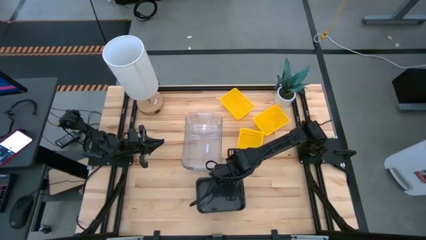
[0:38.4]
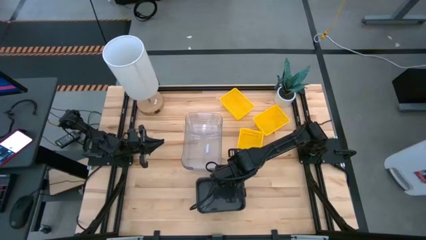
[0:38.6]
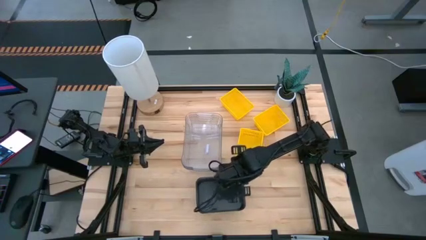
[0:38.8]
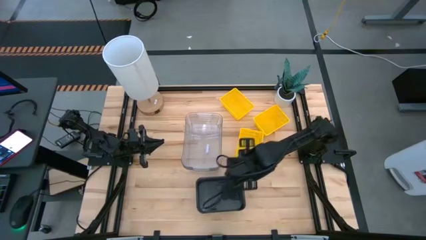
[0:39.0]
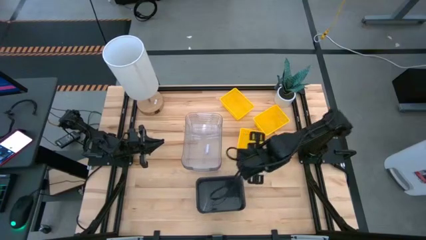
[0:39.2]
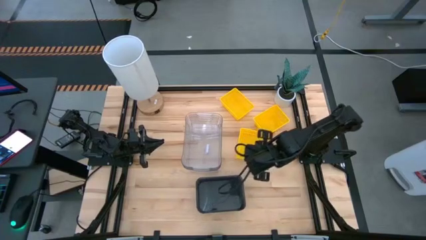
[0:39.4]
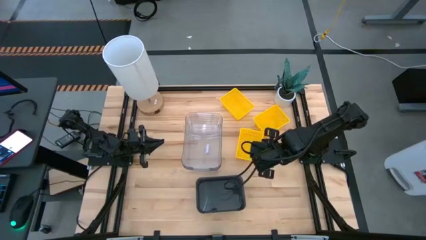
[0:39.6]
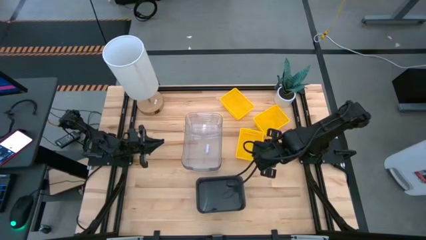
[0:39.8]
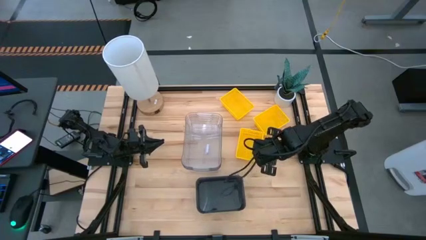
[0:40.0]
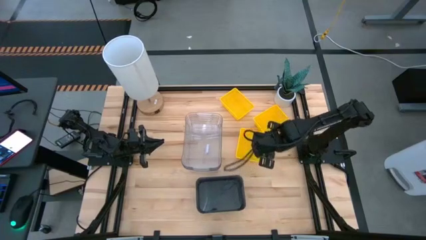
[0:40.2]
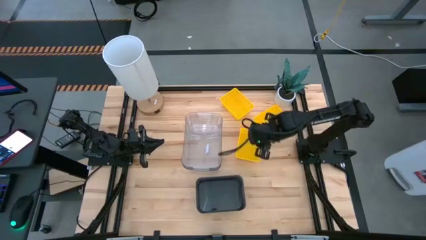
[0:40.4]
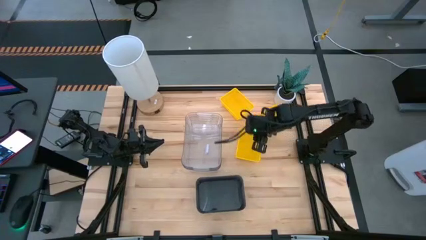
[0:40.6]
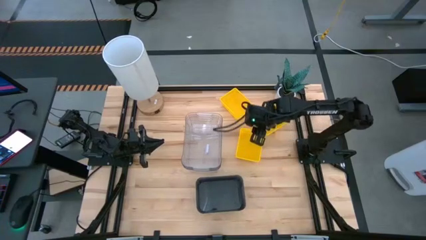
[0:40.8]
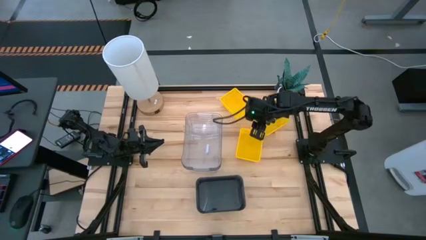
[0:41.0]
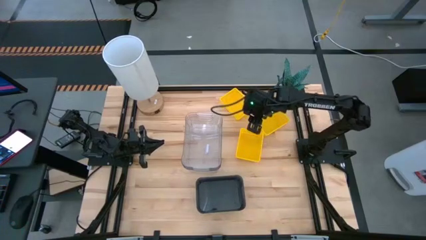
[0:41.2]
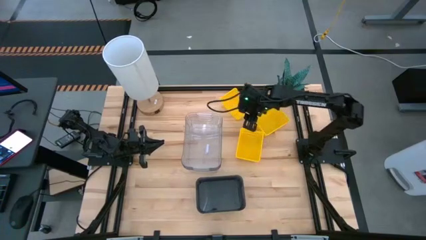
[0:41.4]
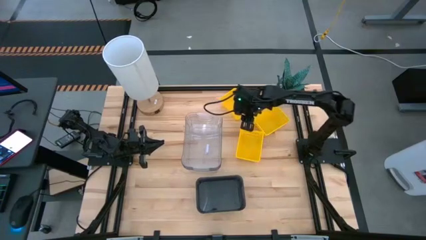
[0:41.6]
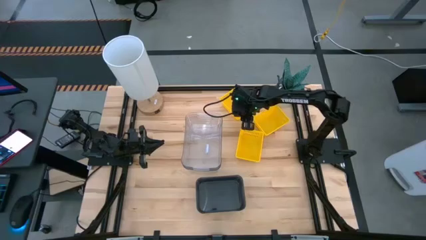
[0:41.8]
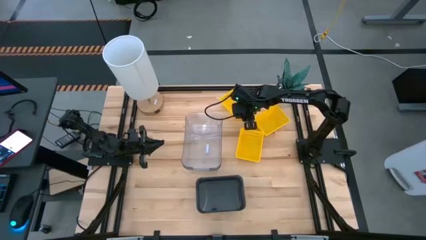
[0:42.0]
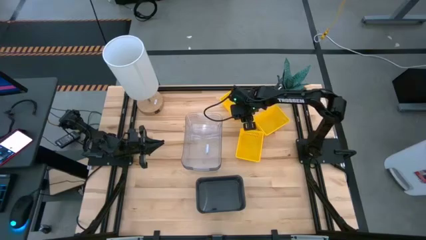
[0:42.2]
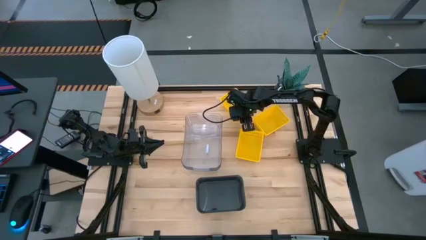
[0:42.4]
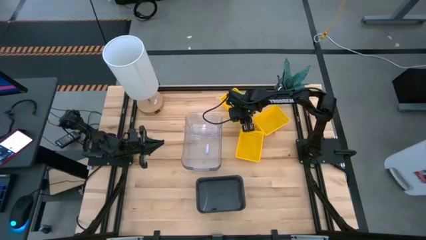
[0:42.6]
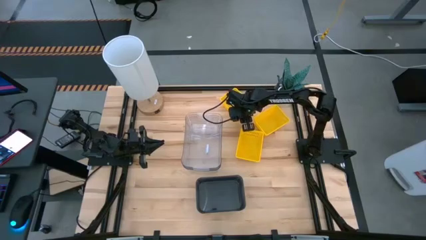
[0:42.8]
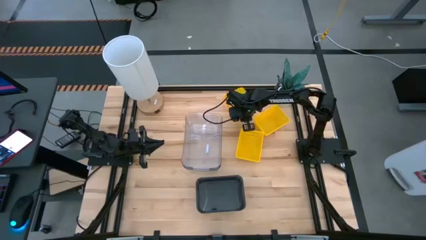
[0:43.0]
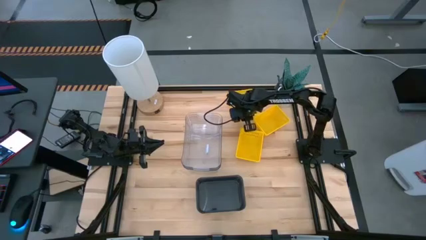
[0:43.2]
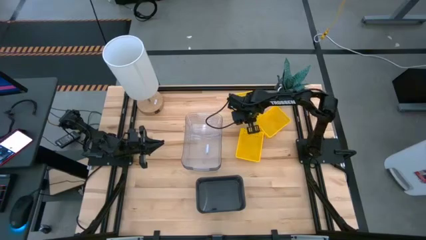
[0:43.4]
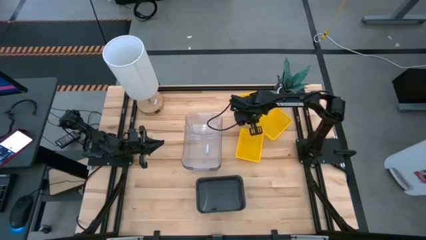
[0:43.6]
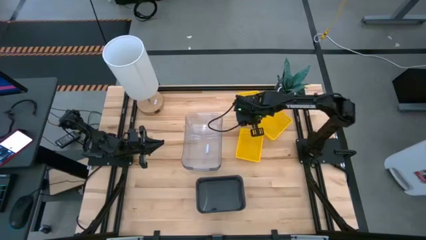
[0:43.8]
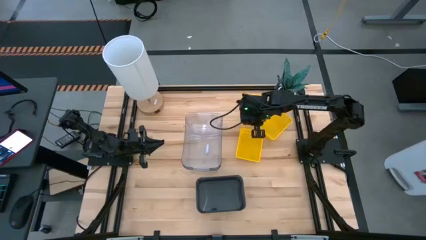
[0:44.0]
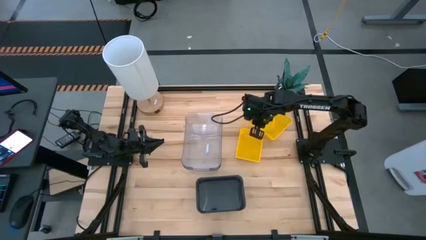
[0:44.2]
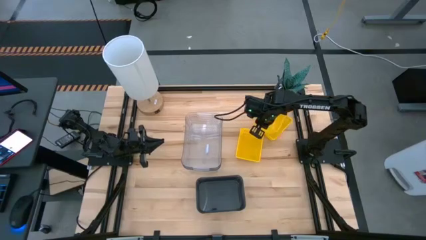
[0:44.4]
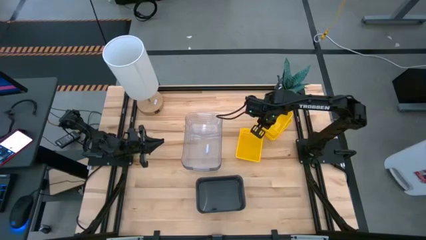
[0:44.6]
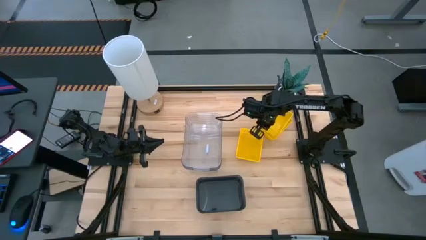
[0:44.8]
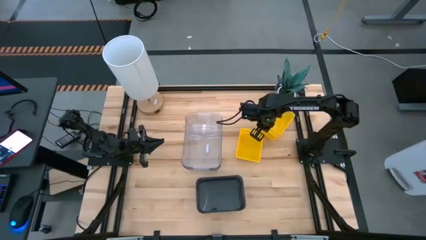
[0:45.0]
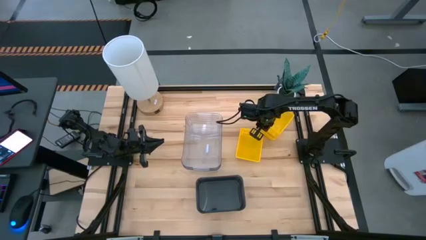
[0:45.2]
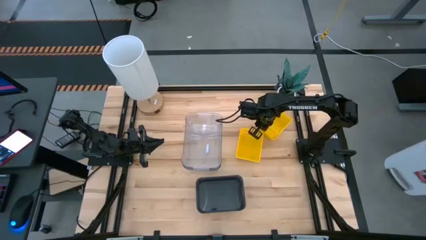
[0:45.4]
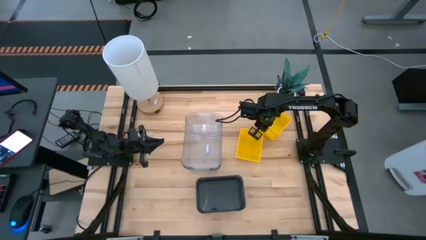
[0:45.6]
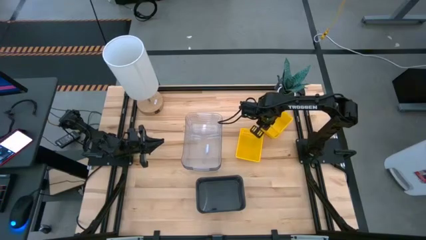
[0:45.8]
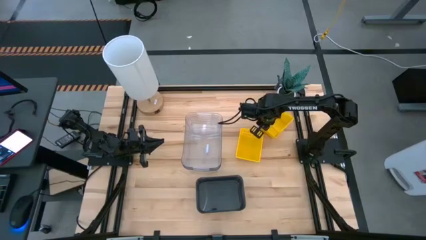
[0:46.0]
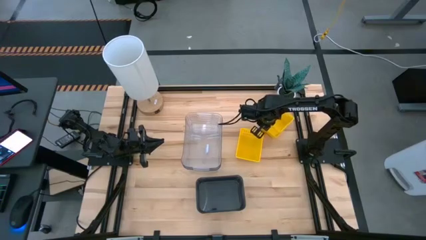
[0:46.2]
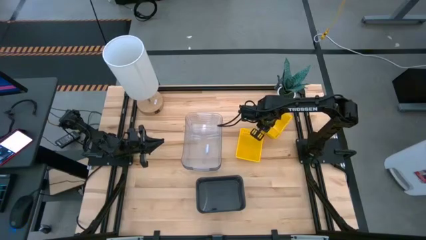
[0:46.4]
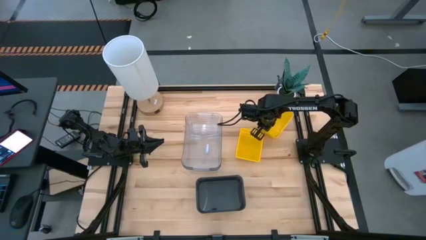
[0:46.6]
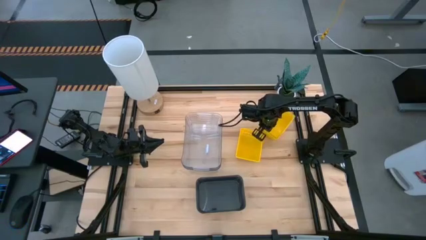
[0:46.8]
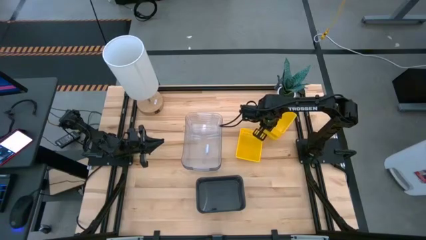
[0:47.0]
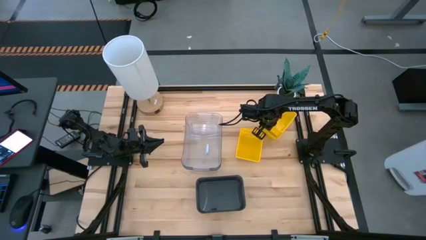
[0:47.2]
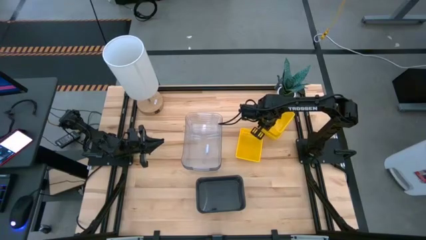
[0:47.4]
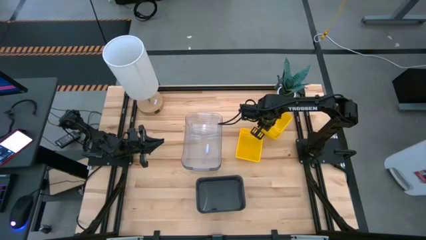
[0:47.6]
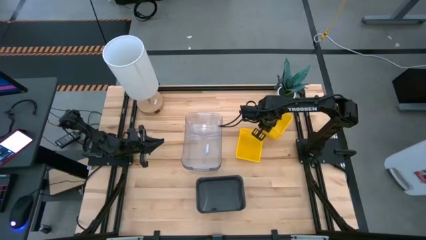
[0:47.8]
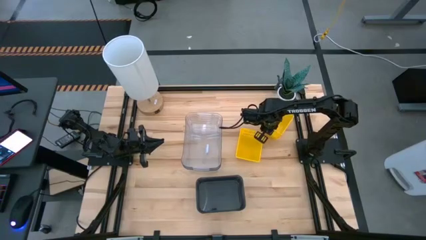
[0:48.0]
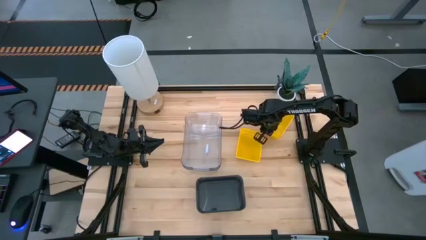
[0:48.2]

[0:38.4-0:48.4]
Stack the top yellow bin on the right yellow bin

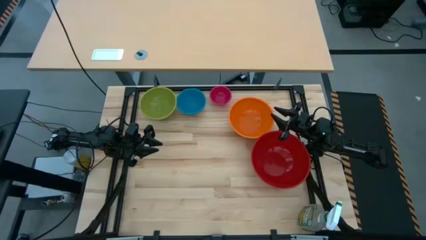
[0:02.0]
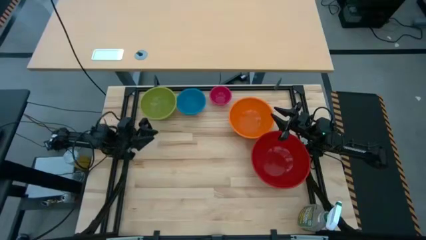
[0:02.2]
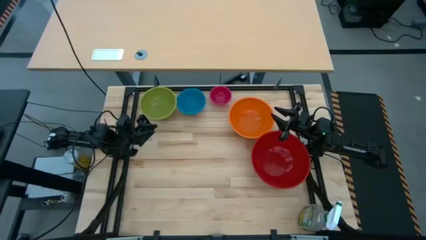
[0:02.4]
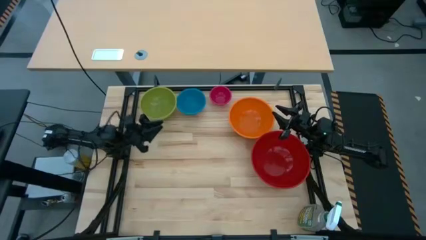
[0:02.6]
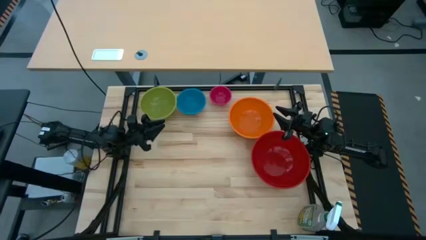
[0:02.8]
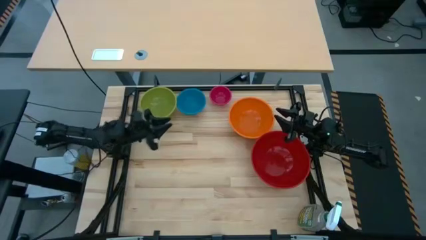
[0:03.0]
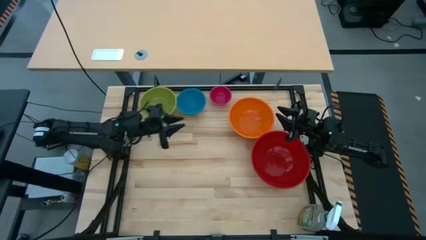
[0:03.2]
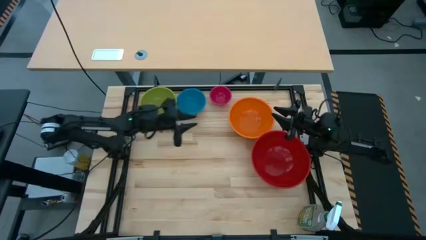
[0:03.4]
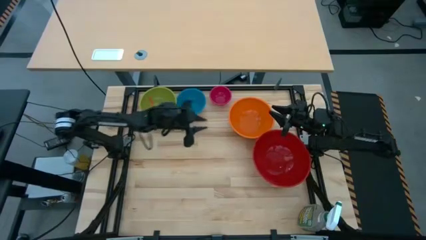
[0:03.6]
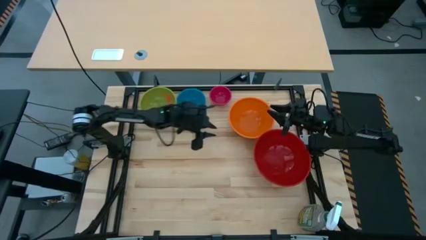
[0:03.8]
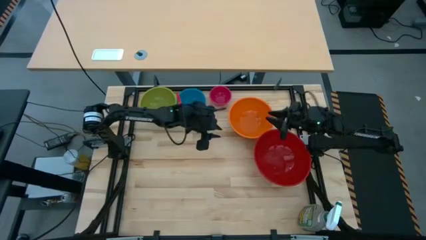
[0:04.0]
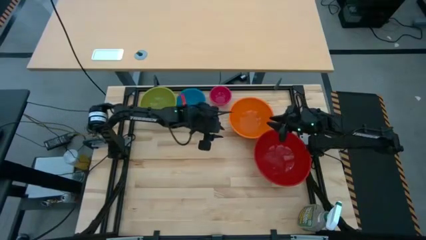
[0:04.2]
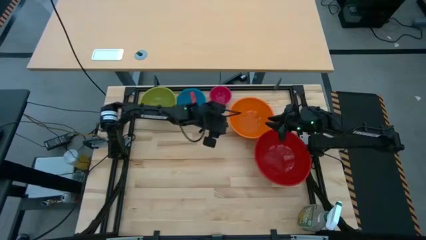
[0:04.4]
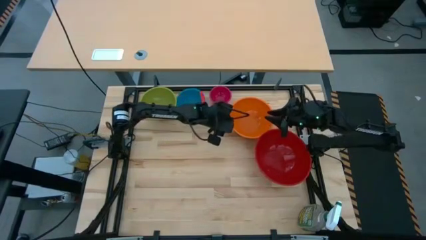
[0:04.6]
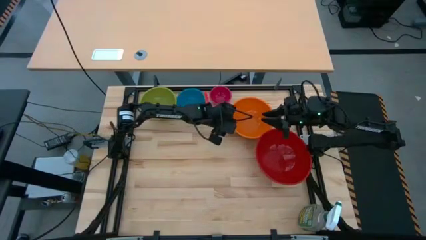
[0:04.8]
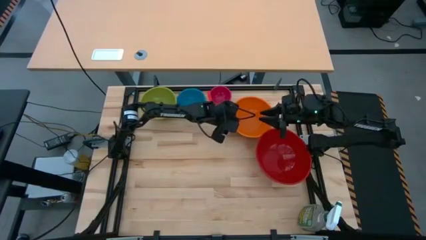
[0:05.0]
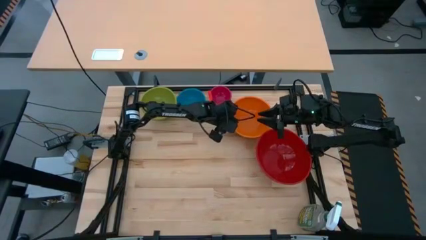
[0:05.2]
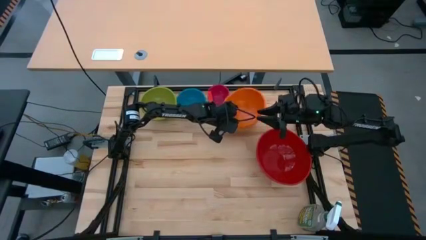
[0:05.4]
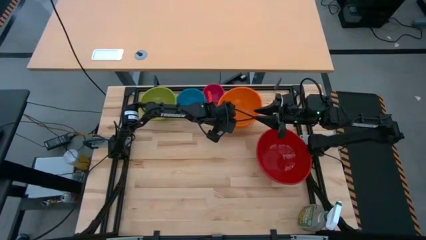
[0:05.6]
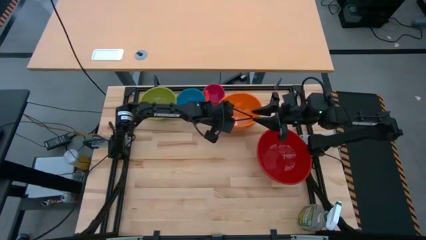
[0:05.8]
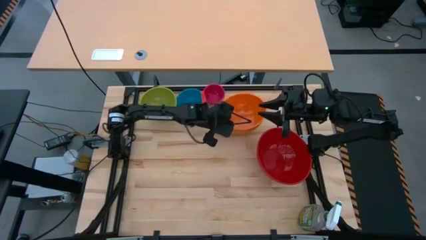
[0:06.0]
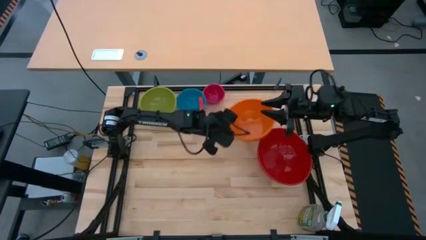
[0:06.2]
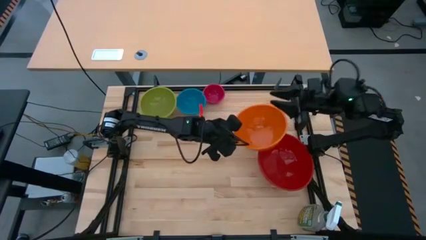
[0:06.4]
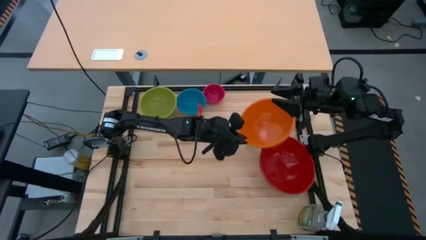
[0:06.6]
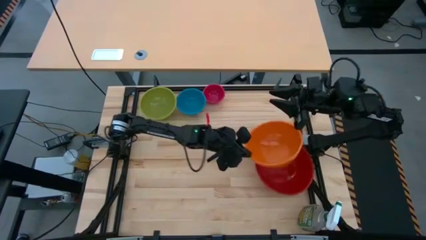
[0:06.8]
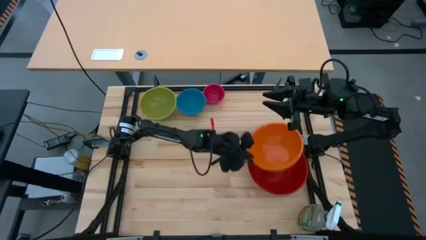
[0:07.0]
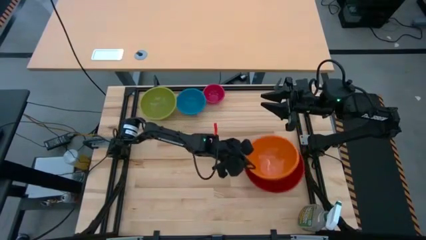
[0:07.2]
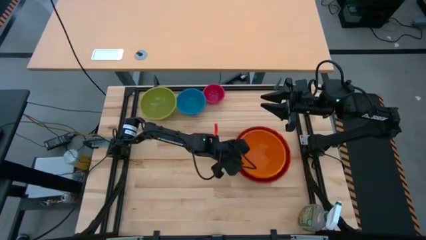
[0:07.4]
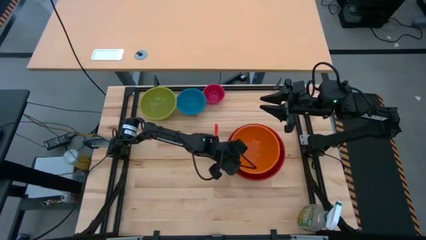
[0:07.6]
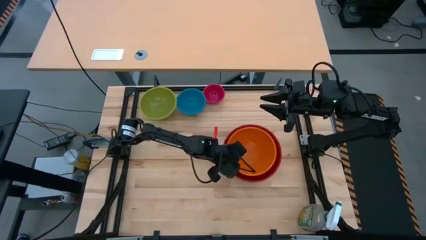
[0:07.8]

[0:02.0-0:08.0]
Stack the orange bowl on top of the red bowl
